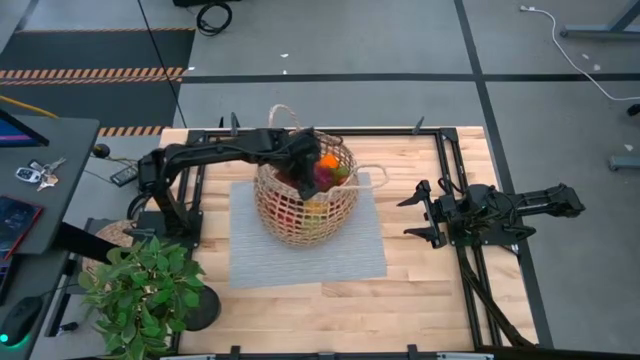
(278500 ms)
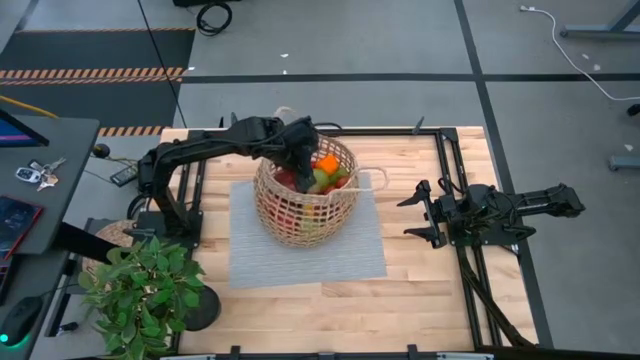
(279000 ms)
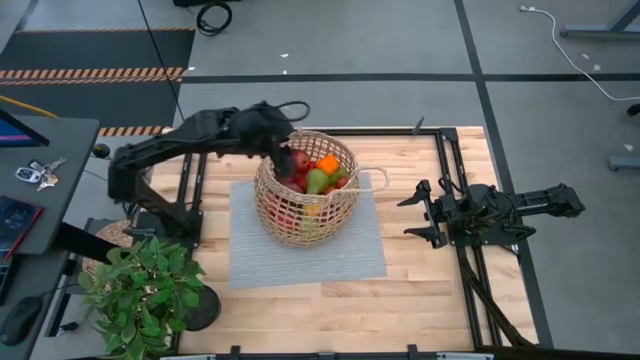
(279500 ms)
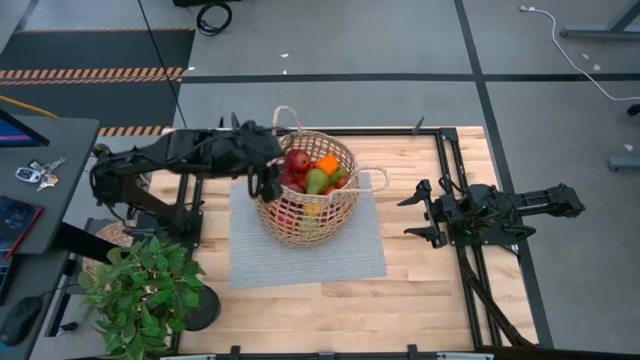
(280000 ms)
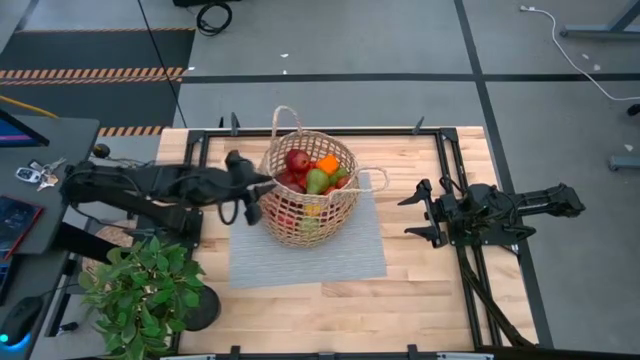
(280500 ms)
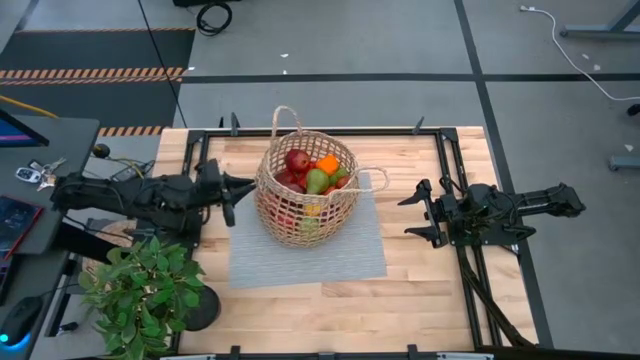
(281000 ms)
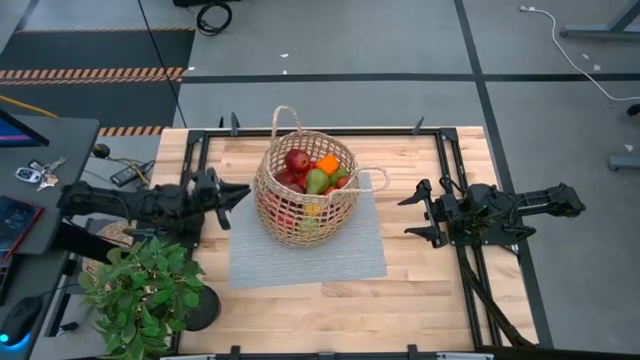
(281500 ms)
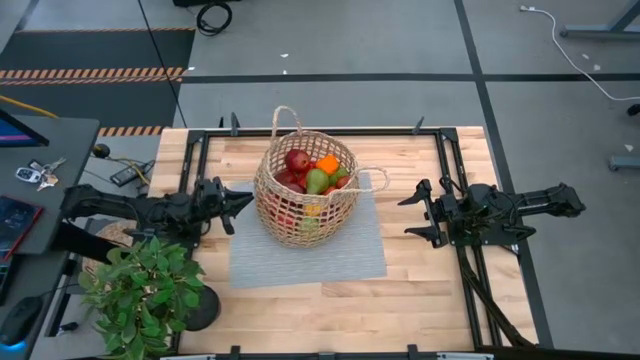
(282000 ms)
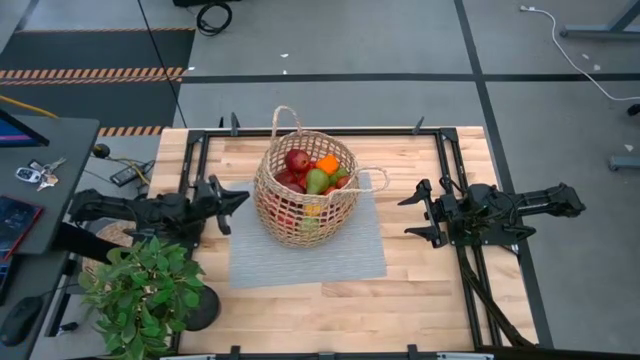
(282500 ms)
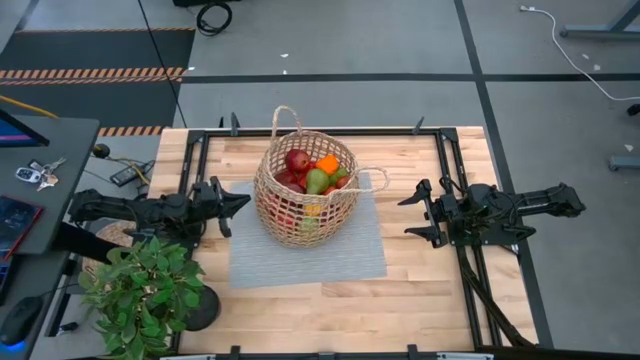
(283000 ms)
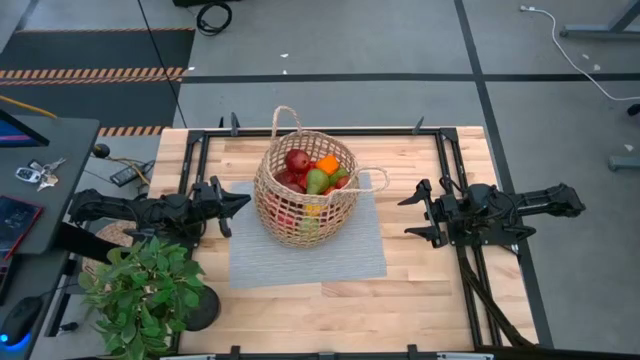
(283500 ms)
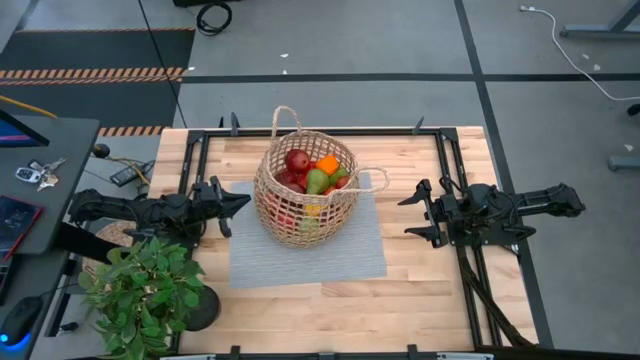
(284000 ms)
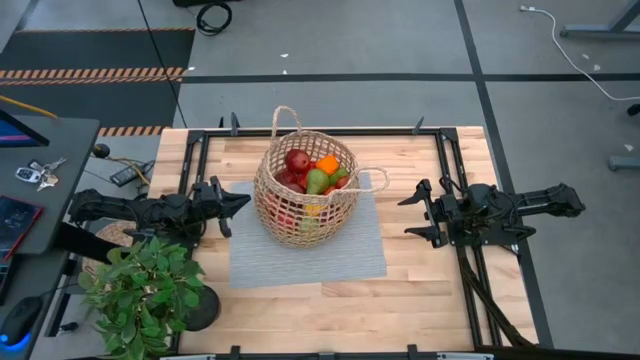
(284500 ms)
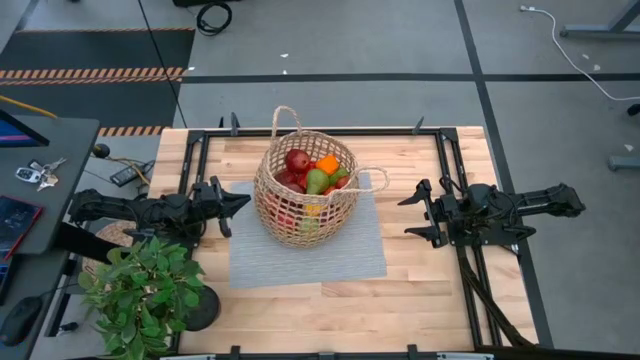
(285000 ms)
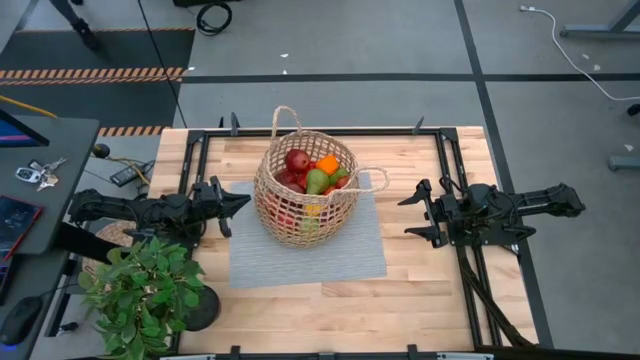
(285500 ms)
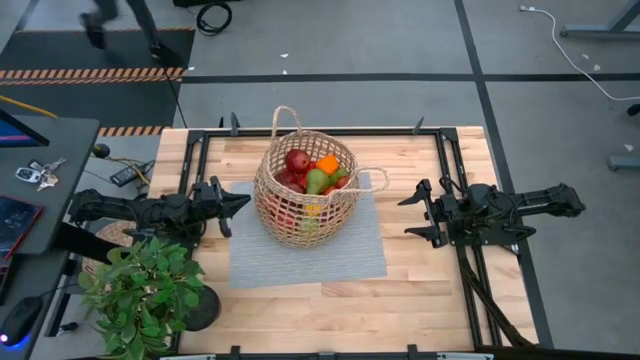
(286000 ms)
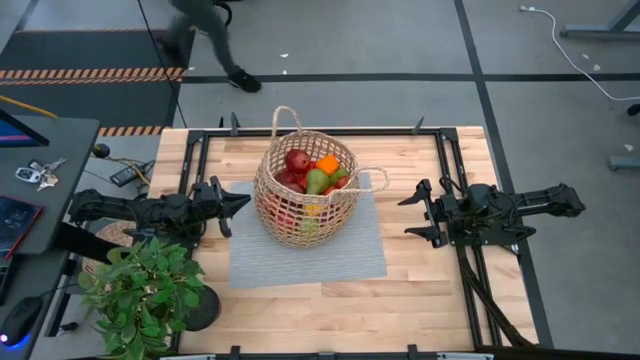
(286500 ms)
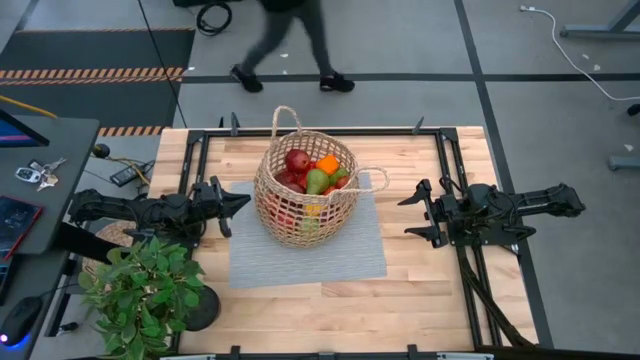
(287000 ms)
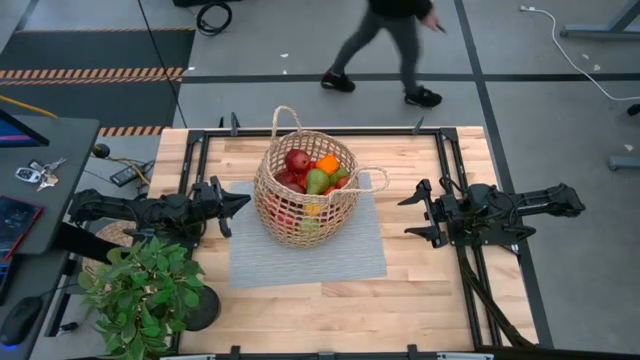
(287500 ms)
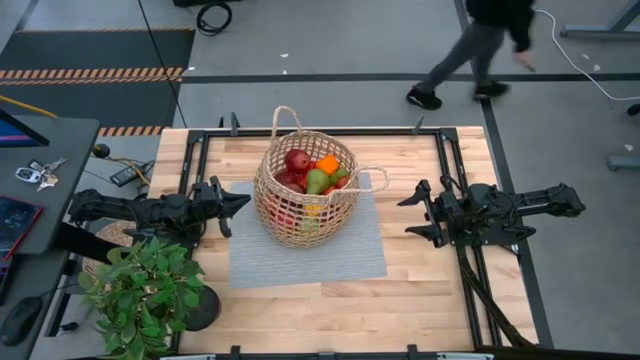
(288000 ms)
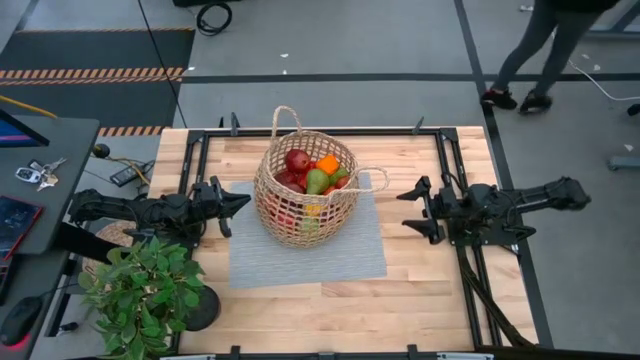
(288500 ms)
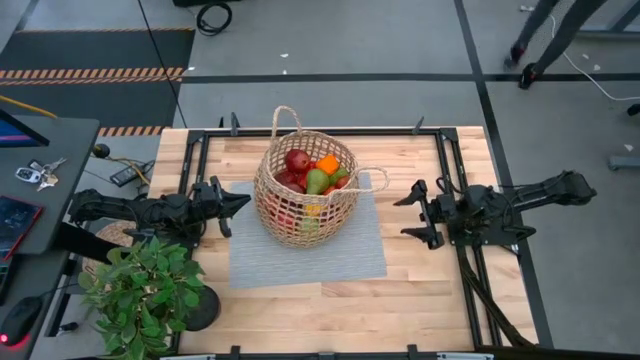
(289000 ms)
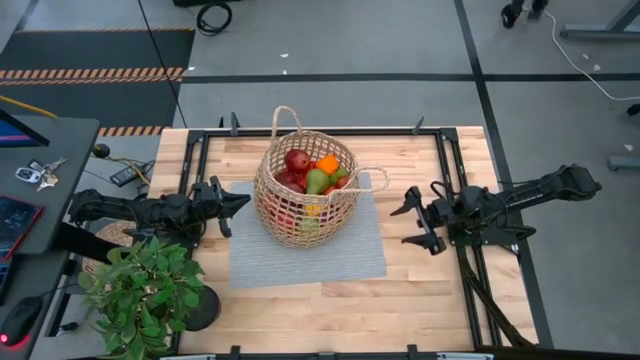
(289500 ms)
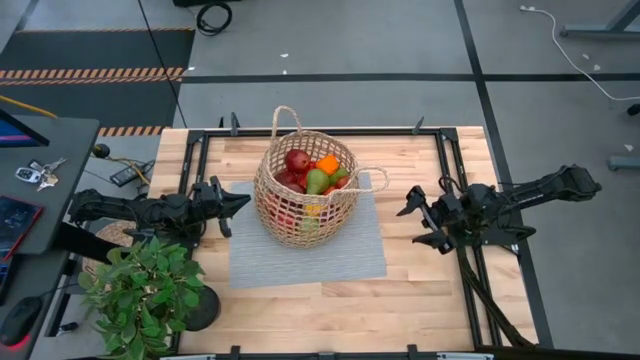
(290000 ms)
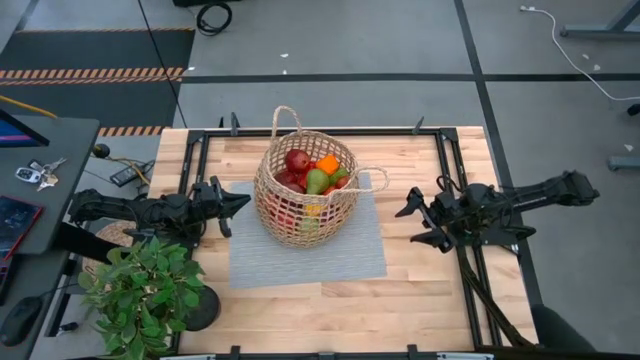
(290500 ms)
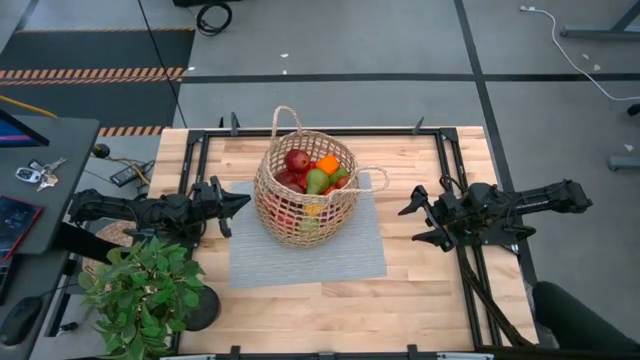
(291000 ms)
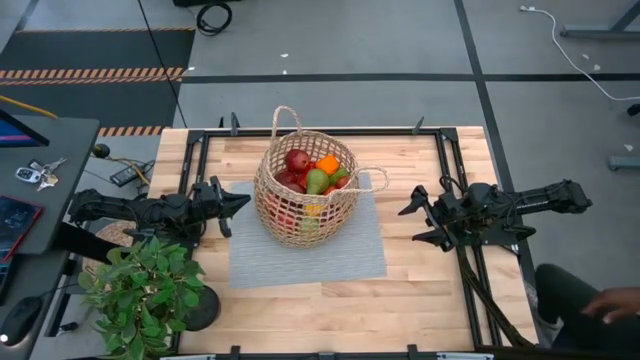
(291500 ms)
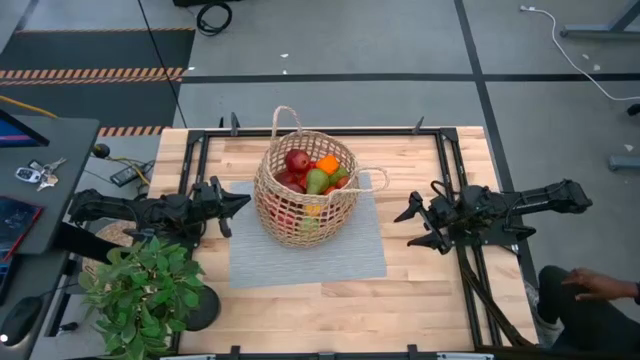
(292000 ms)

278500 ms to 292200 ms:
Task: Build produce basket
Return to Home Position

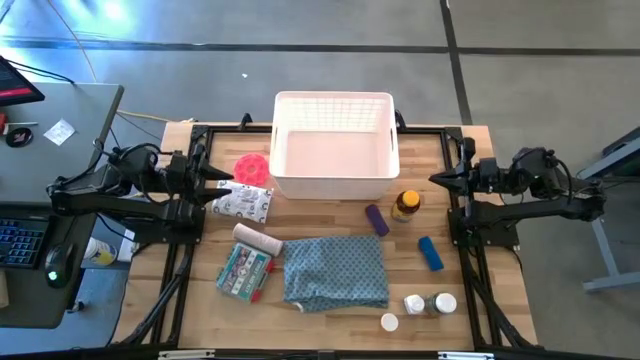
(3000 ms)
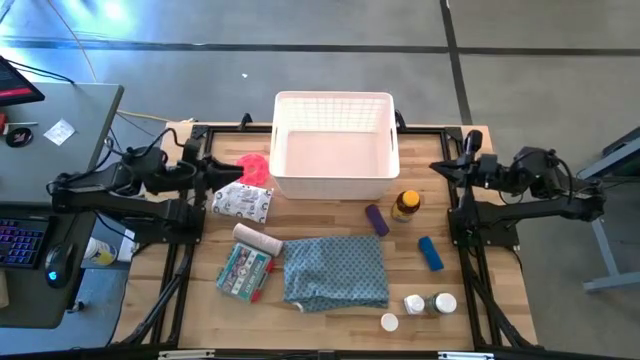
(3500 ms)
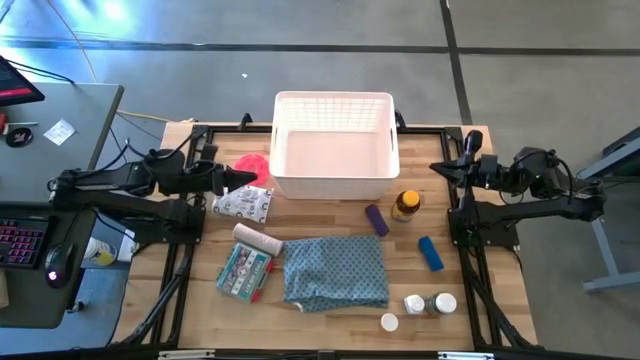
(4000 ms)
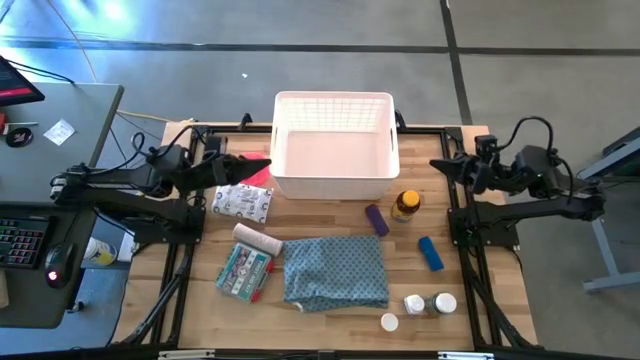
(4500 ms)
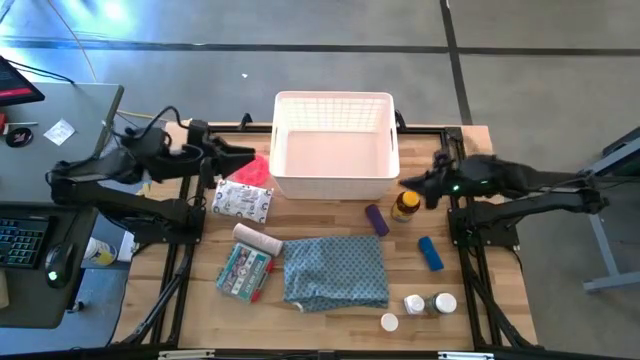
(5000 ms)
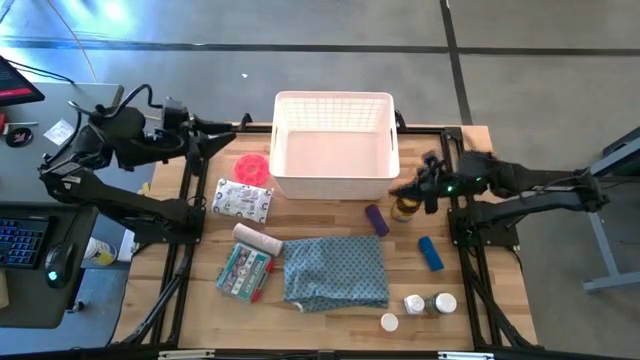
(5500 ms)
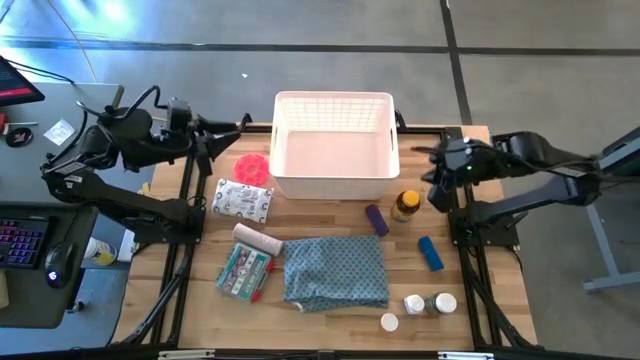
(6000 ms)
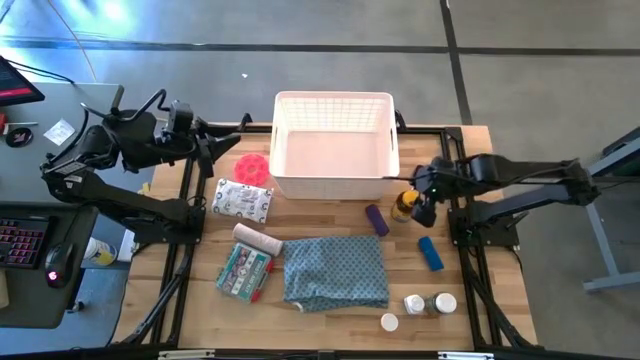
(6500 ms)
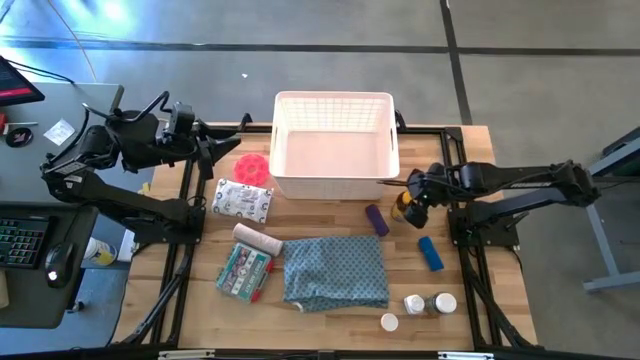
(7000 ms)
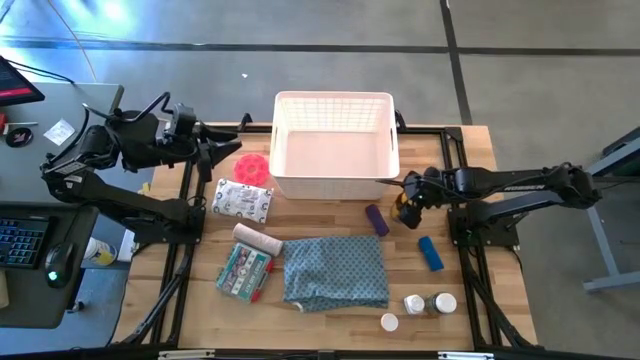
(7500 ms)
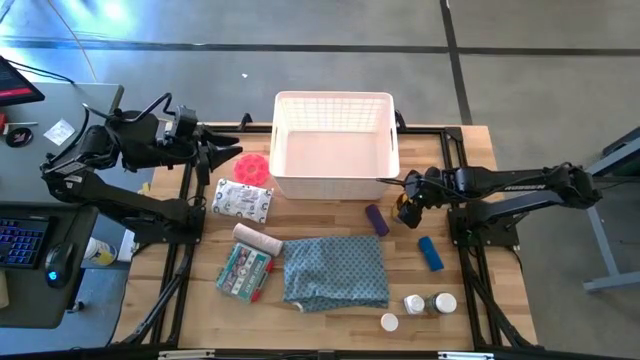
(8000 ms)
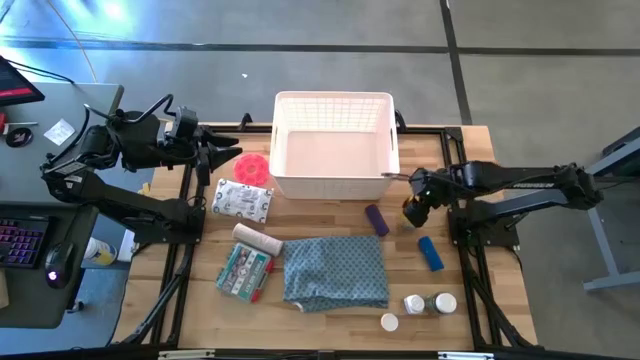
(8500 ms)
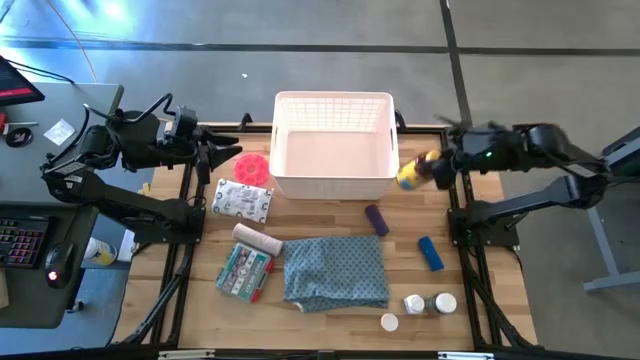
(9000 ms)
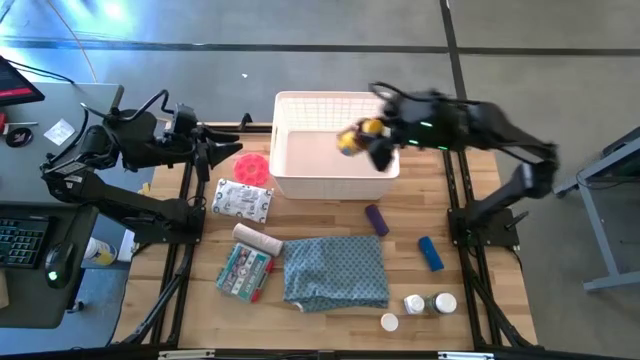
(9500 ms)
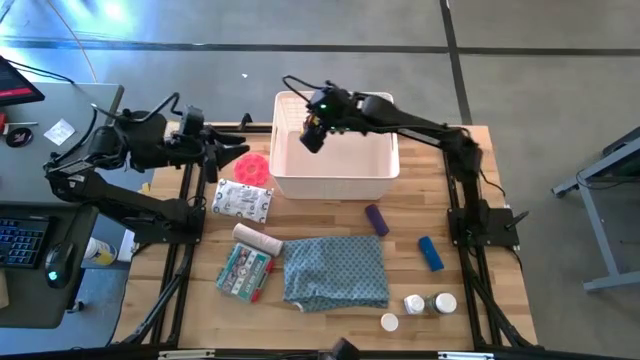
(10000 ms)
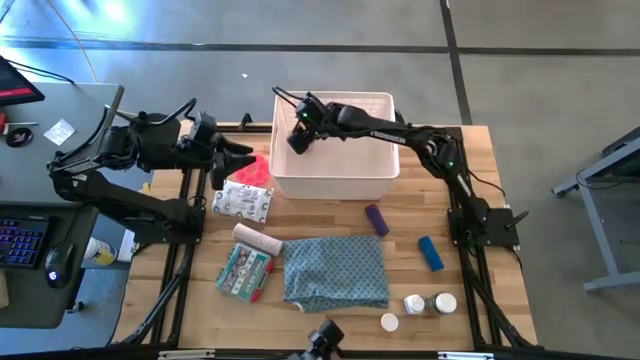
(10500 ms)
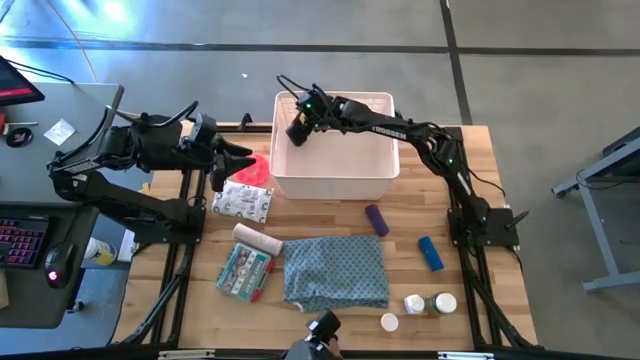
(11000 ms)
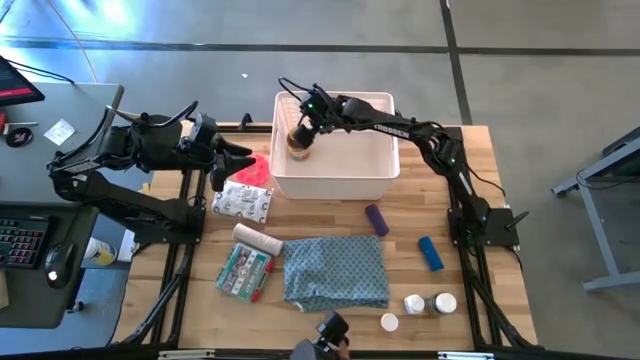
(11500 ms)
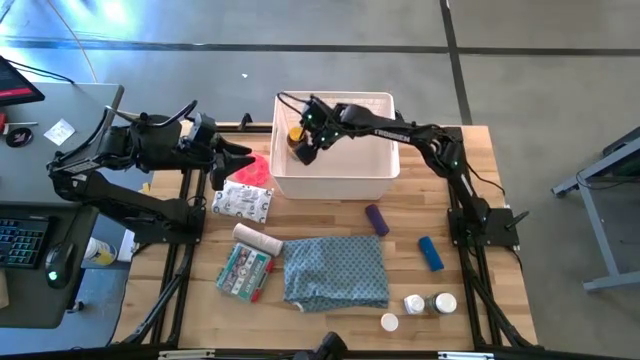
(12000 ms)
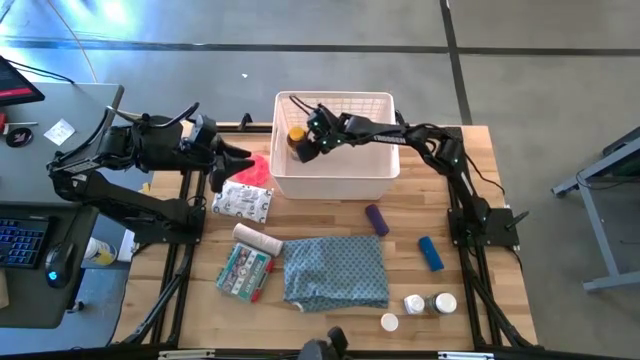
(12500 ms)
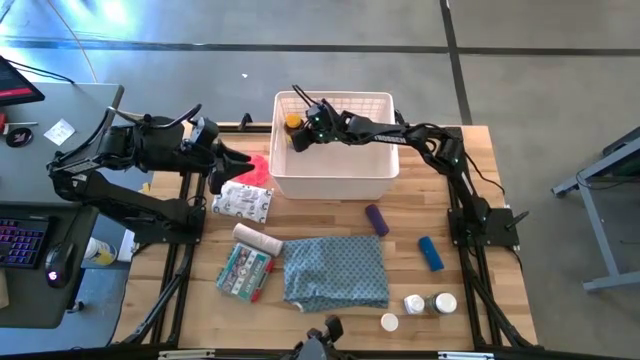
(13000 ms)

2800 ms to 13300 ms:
Task: Pick & place medical supplies in basket/bin
Put the yellow pill bottle into the white bin
